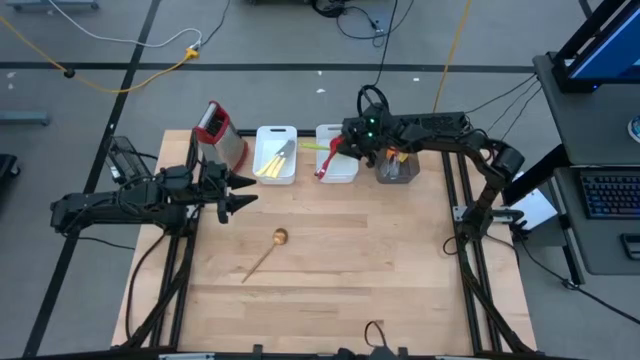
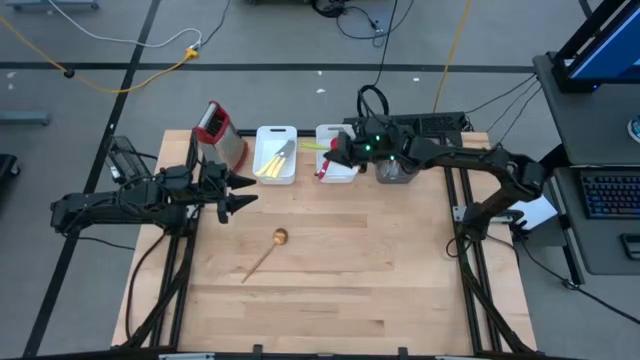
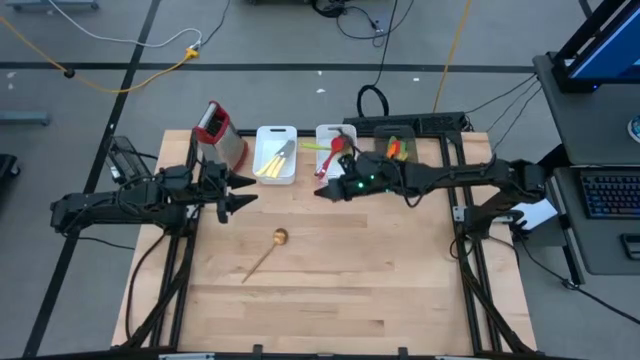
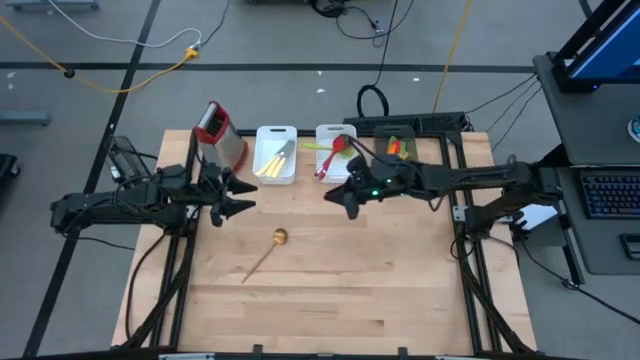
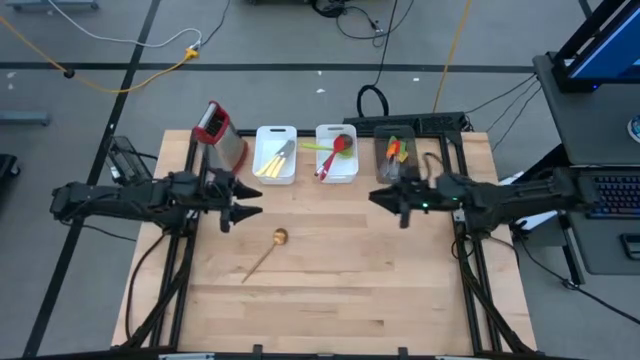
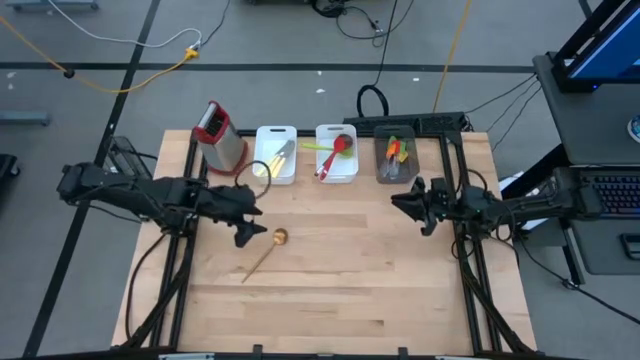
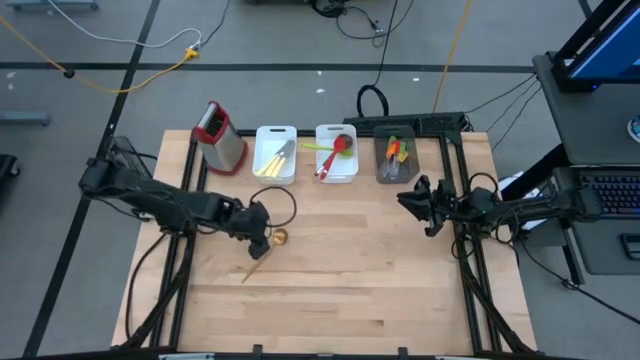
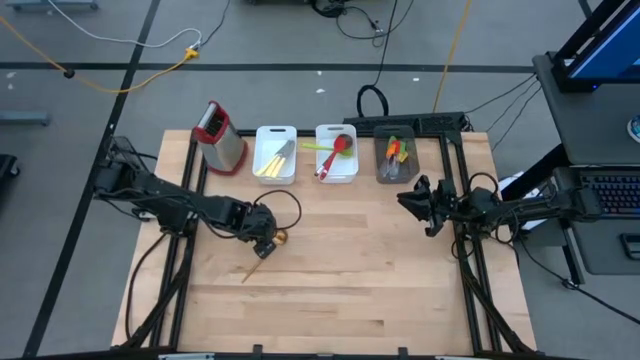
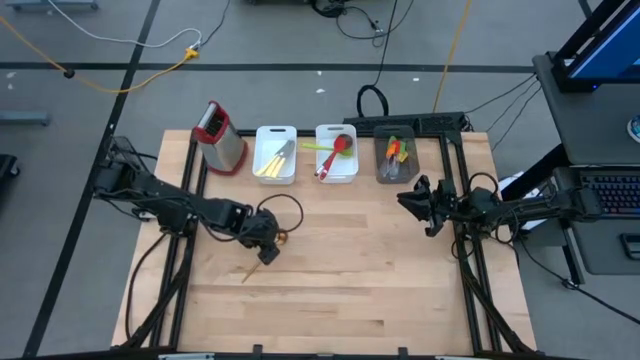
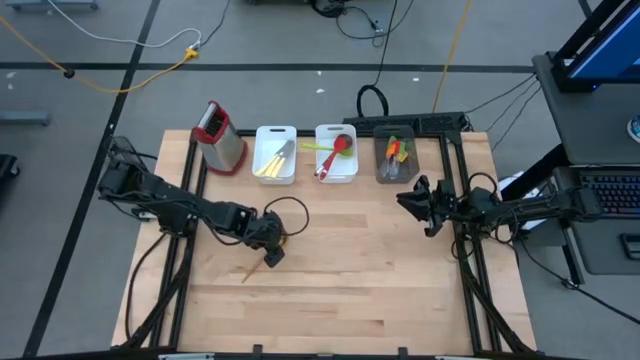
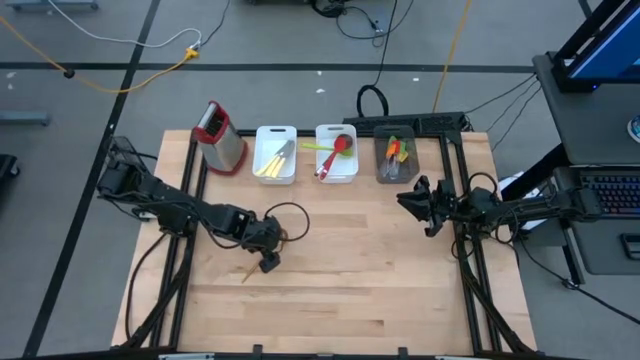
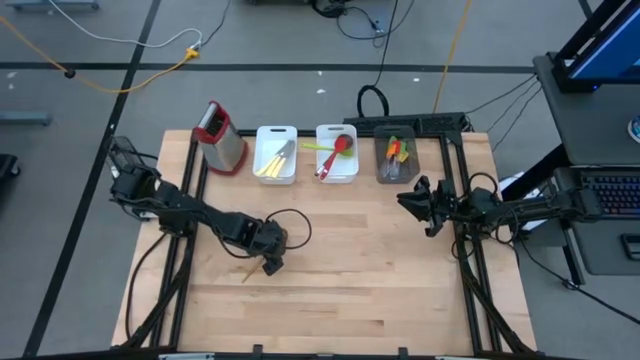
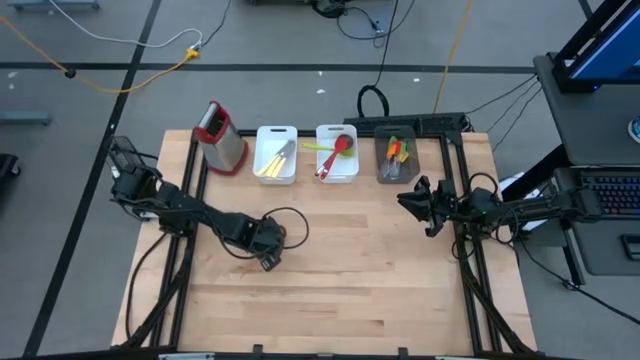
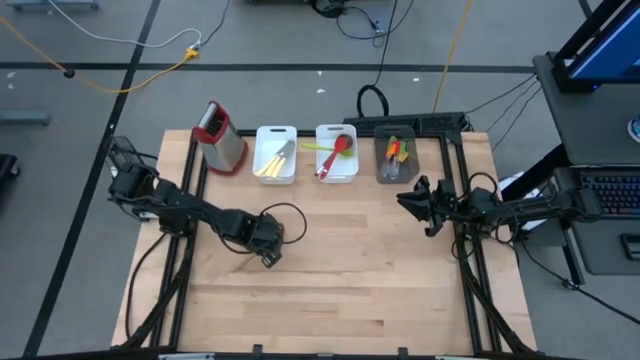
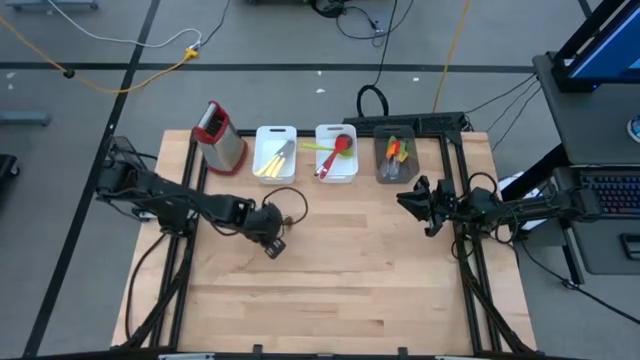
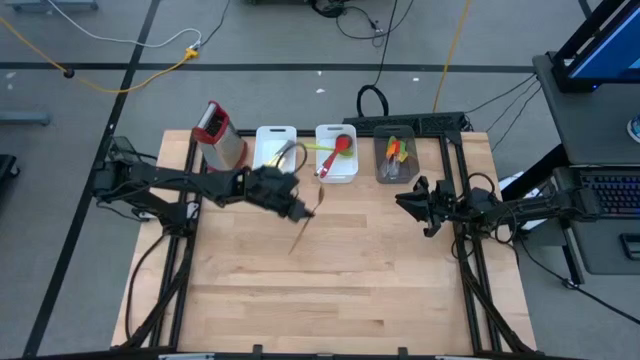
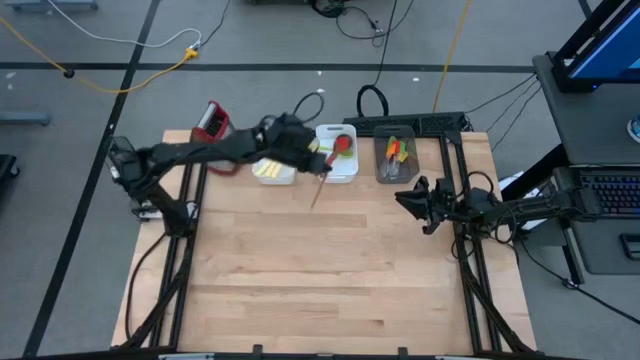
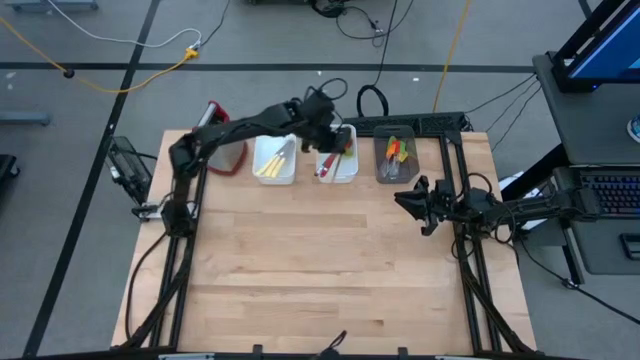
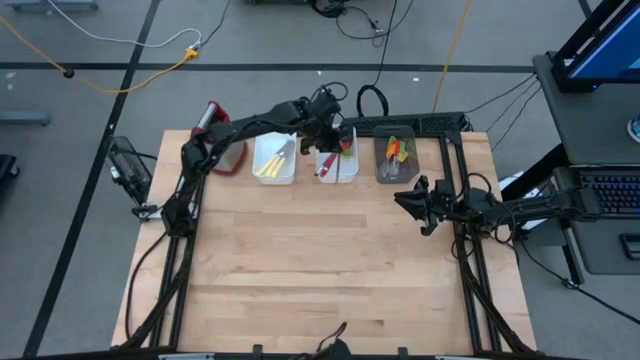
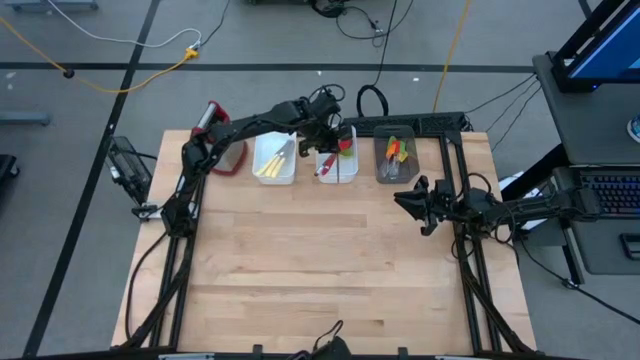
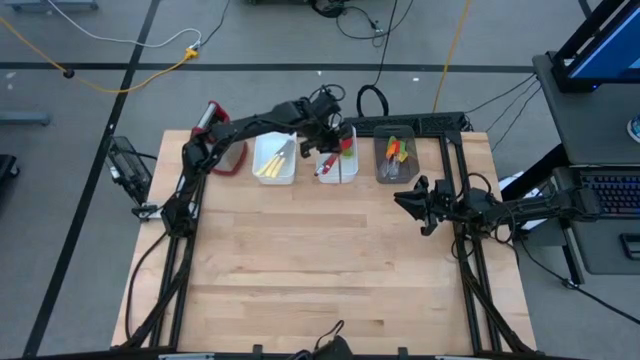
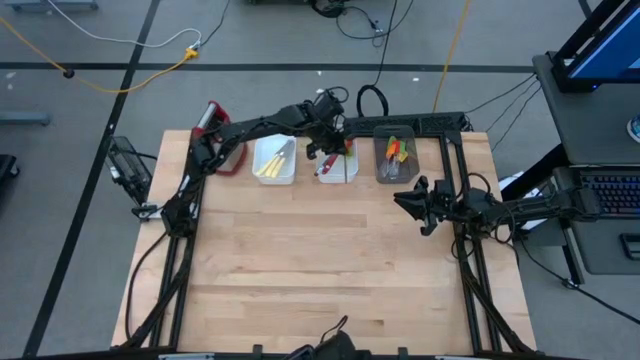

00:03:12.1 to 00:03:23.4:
Task: Pick & Place Kitchen Items
Put the golden spoon into the right white bin

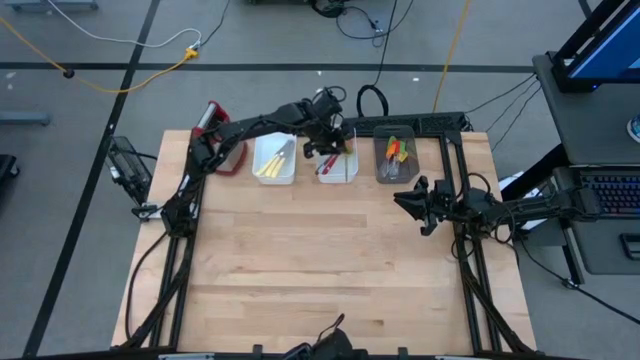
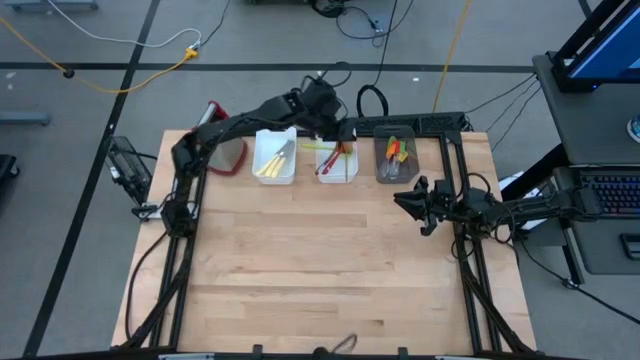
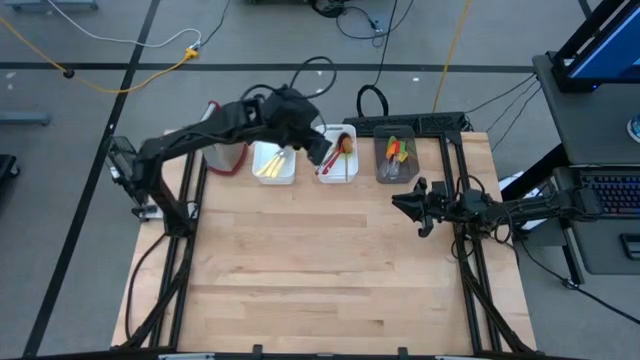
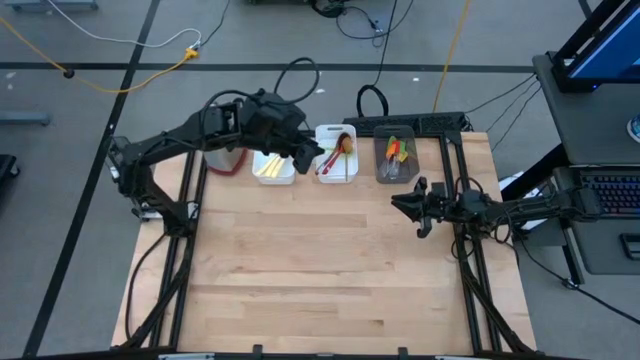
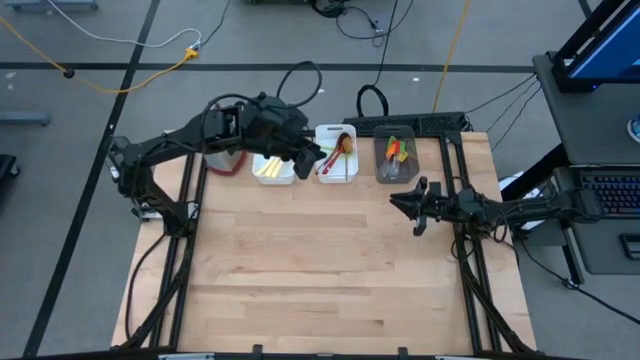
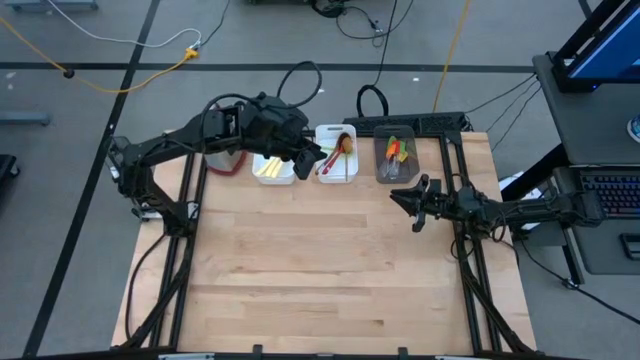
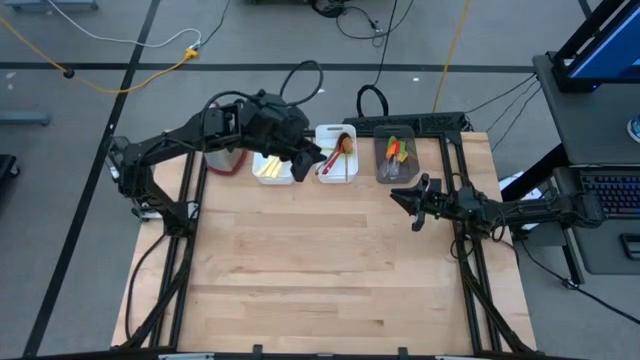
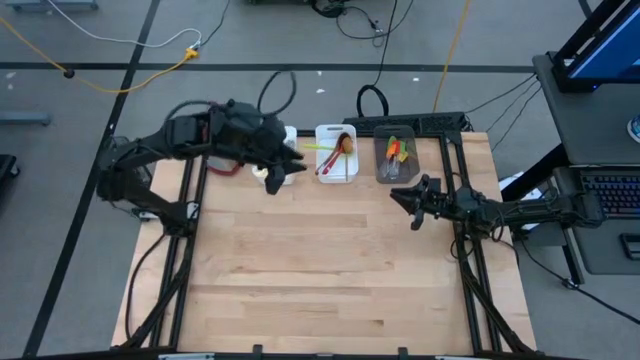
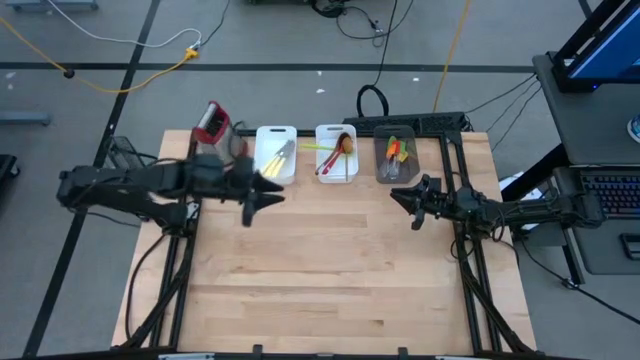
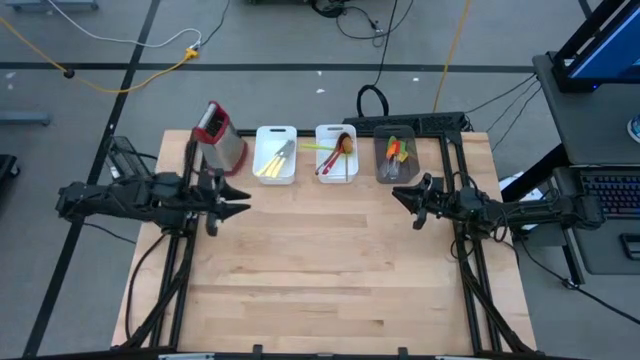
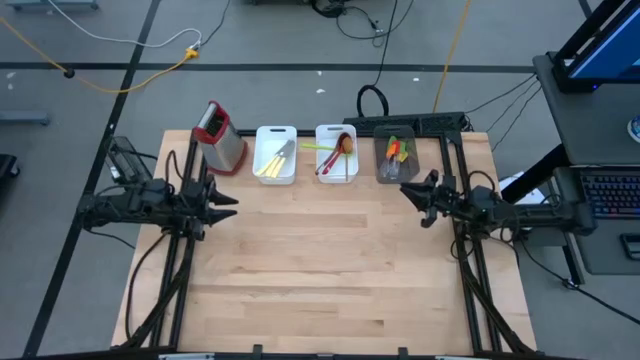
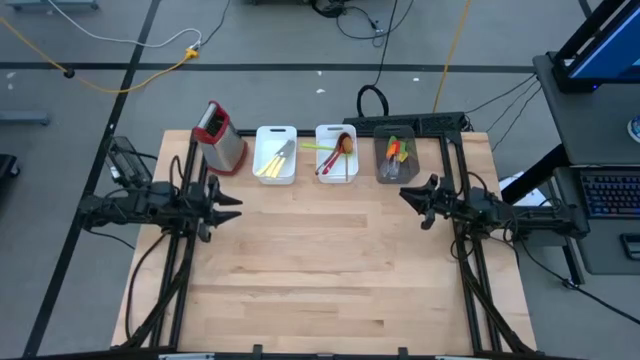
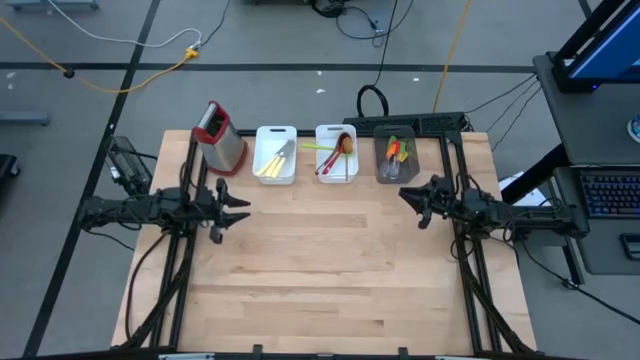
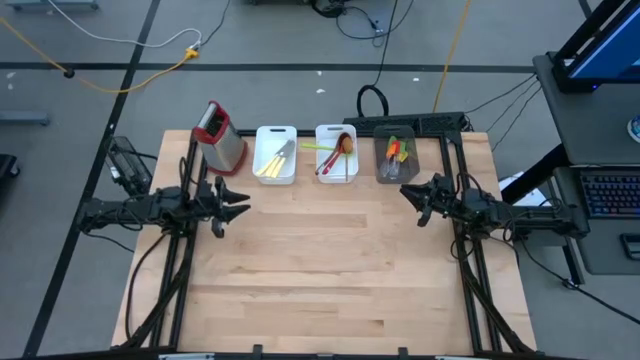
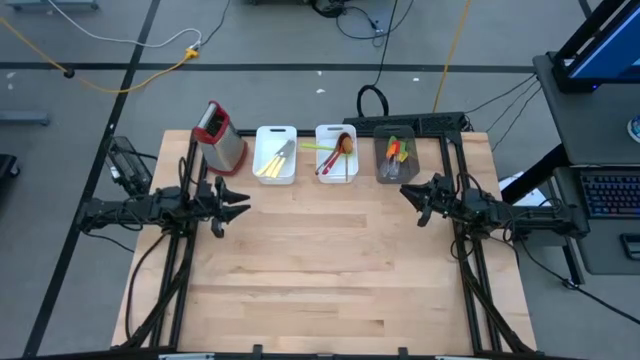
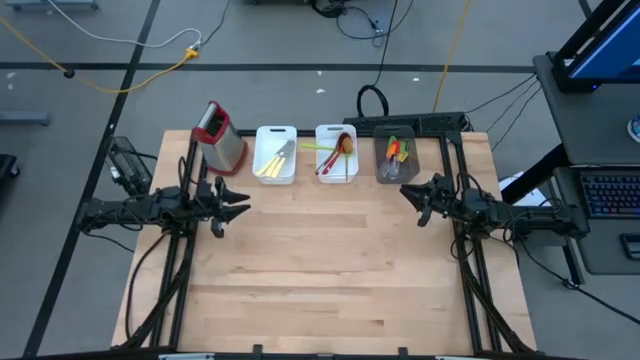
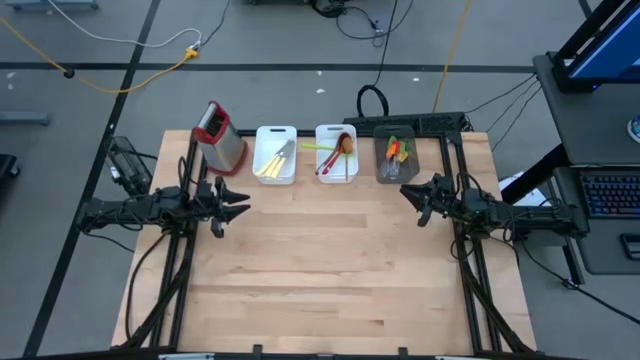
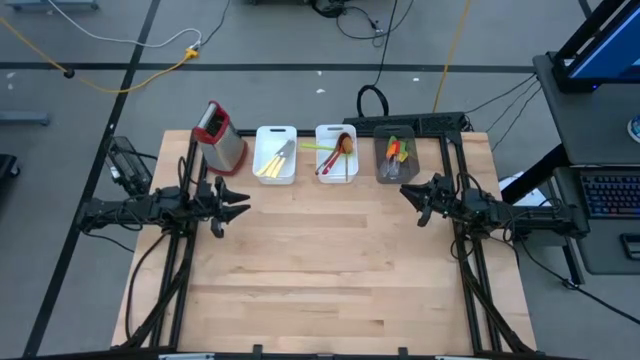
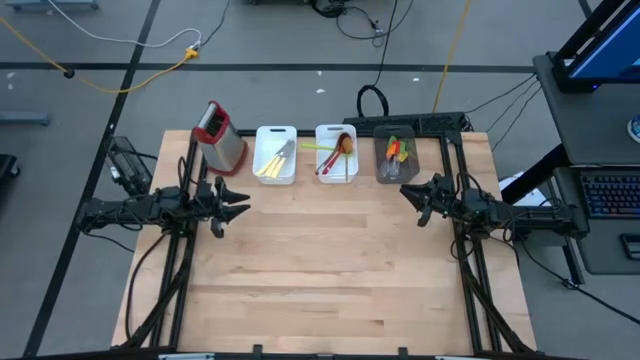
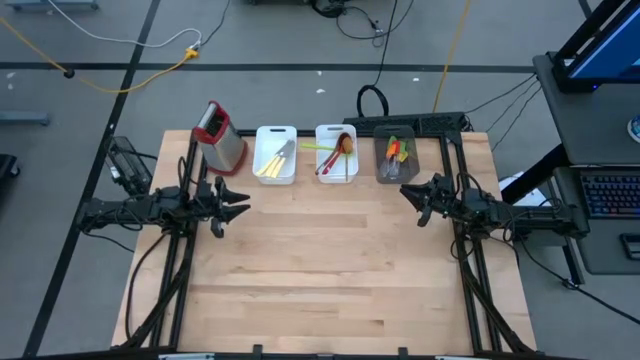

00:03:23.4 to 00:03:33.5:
Return to Home Position
